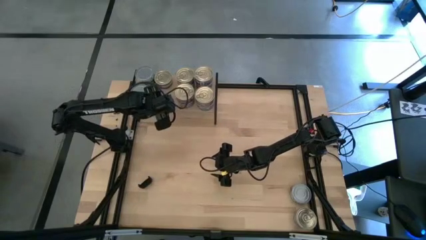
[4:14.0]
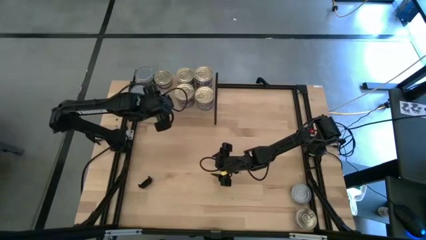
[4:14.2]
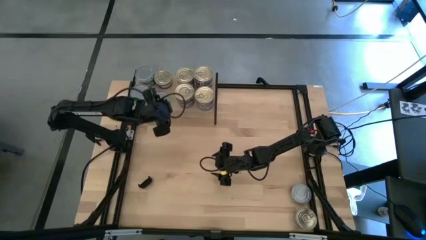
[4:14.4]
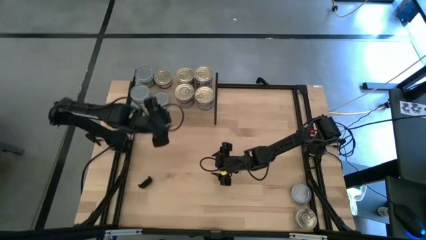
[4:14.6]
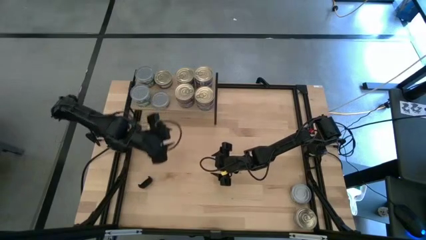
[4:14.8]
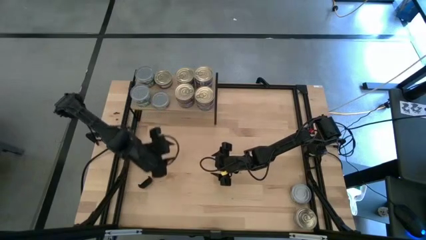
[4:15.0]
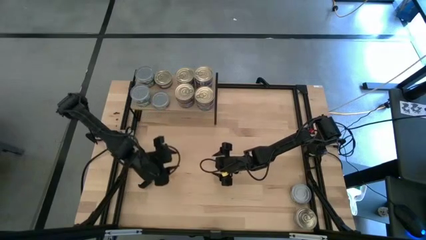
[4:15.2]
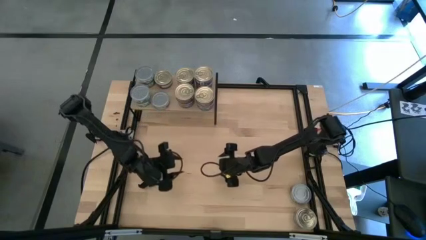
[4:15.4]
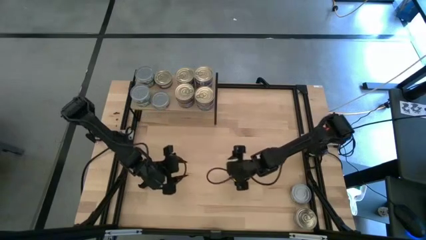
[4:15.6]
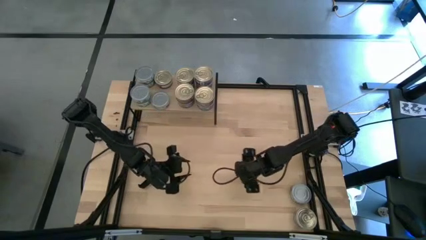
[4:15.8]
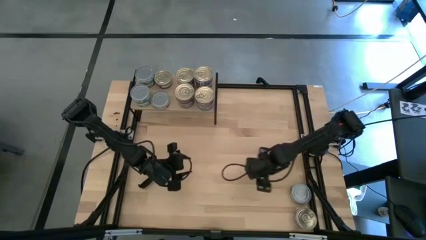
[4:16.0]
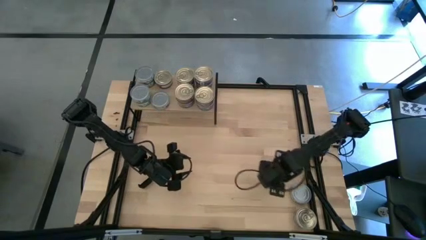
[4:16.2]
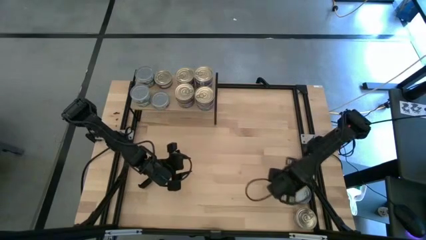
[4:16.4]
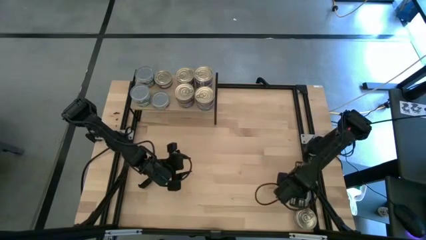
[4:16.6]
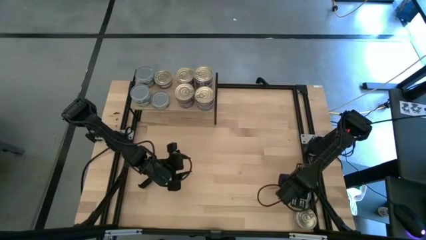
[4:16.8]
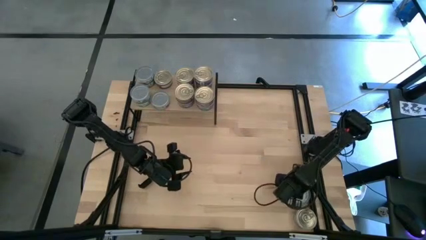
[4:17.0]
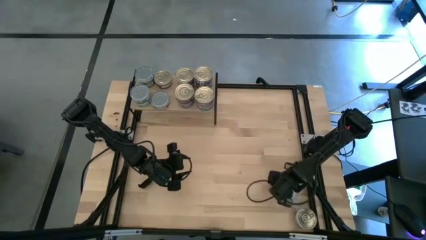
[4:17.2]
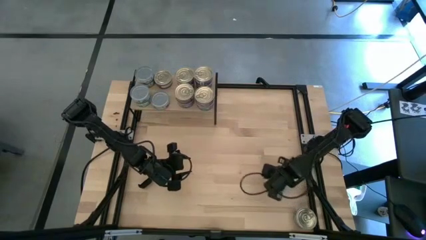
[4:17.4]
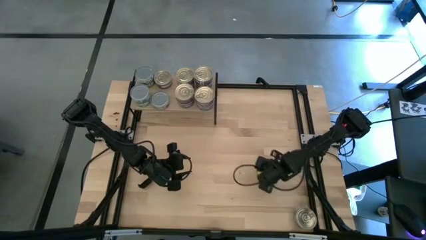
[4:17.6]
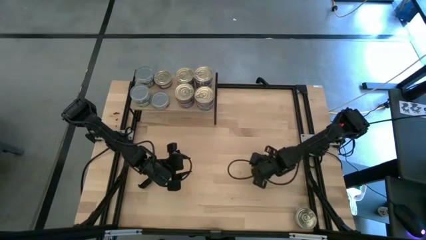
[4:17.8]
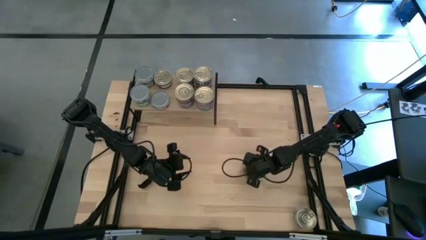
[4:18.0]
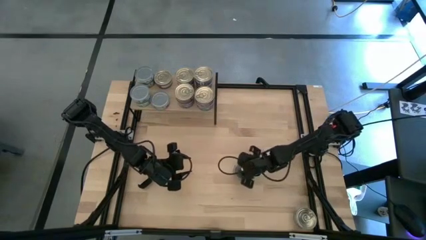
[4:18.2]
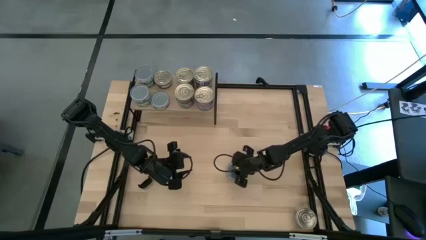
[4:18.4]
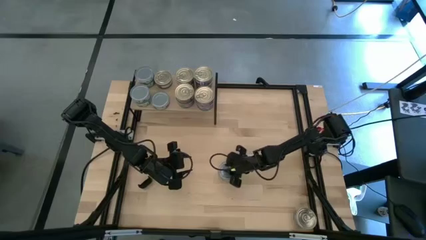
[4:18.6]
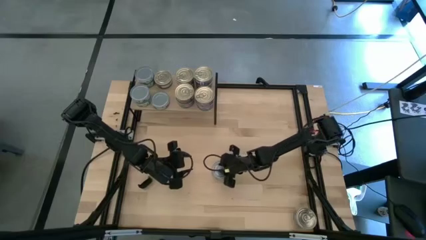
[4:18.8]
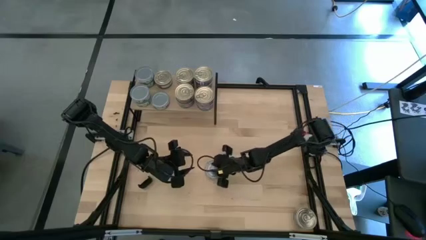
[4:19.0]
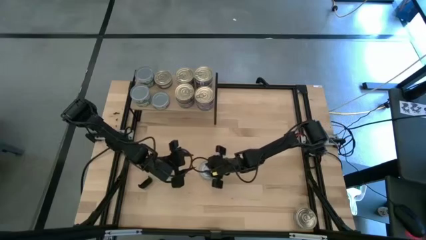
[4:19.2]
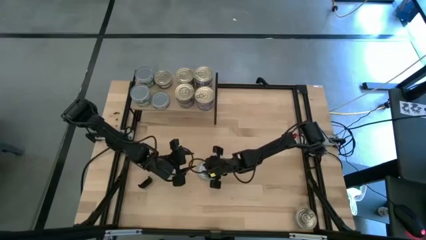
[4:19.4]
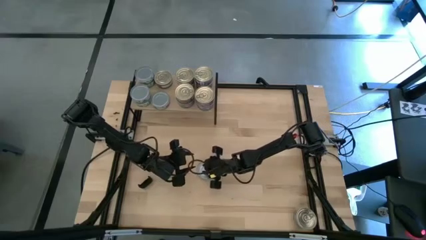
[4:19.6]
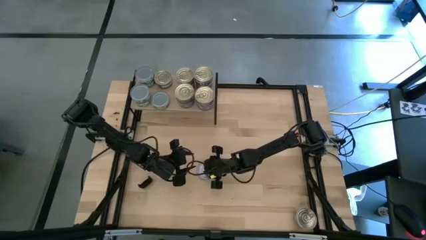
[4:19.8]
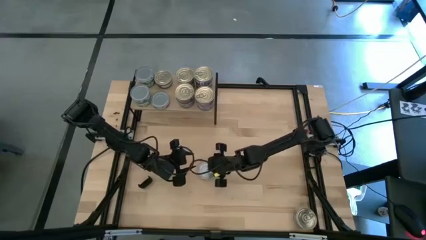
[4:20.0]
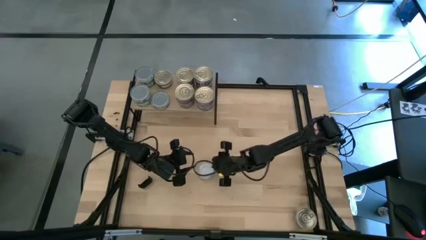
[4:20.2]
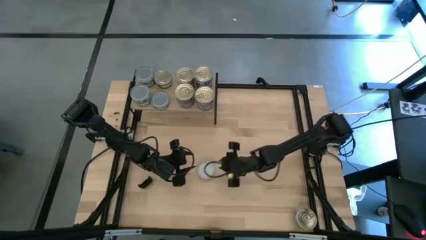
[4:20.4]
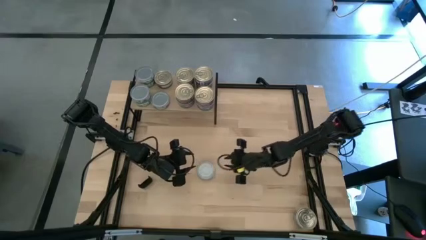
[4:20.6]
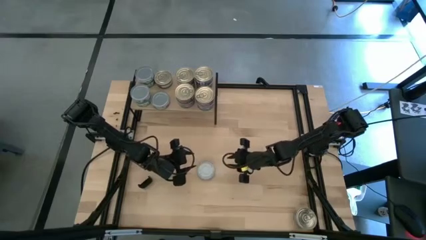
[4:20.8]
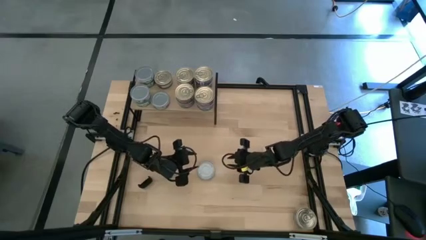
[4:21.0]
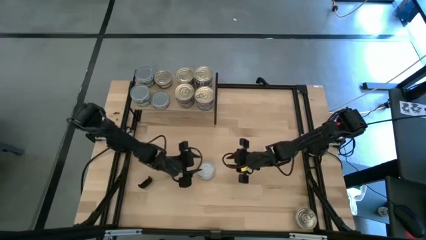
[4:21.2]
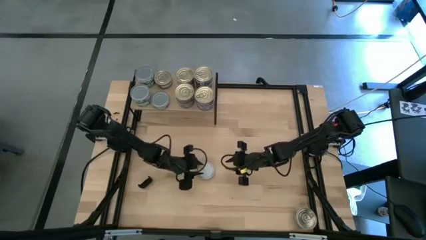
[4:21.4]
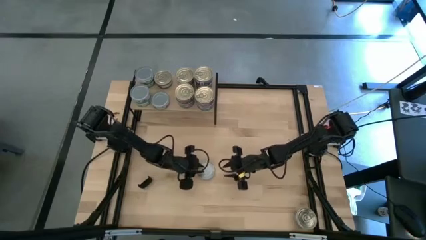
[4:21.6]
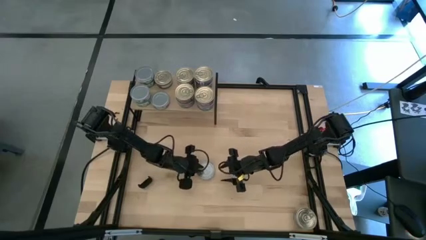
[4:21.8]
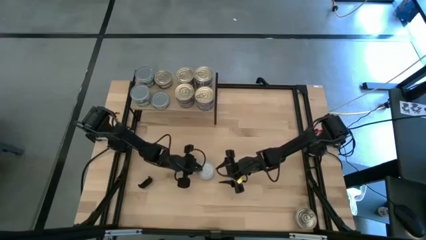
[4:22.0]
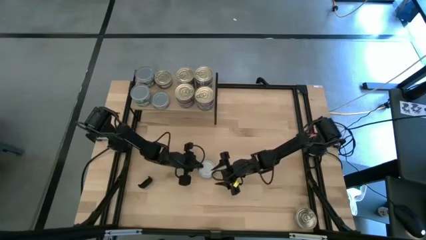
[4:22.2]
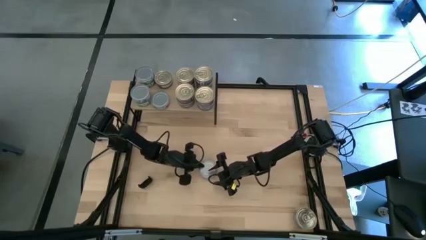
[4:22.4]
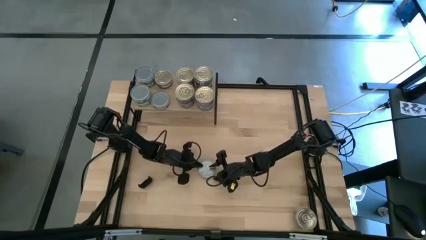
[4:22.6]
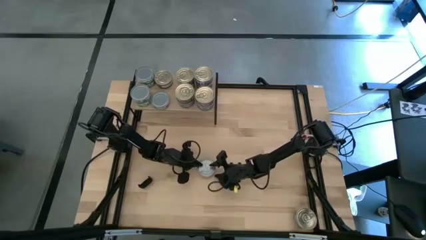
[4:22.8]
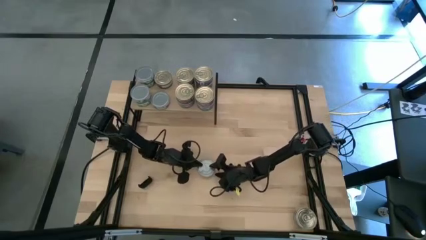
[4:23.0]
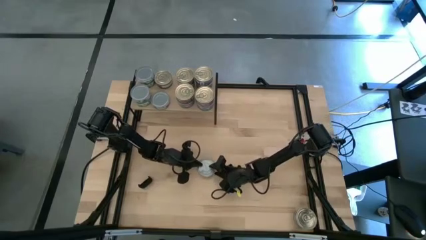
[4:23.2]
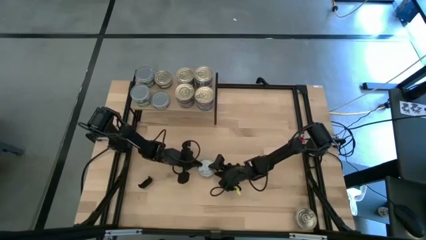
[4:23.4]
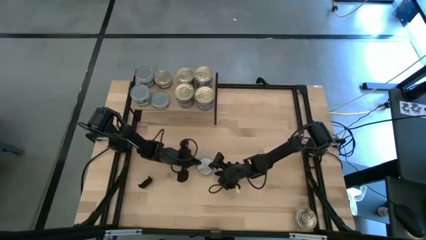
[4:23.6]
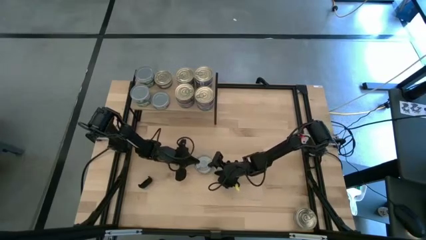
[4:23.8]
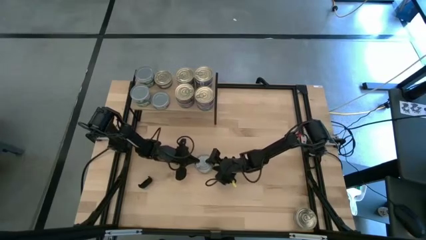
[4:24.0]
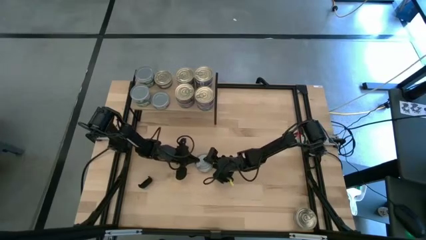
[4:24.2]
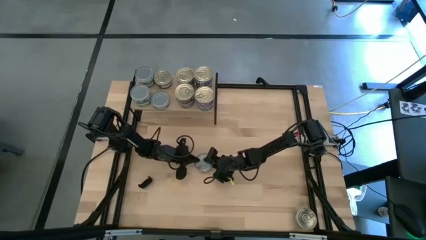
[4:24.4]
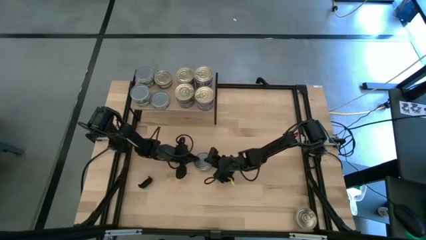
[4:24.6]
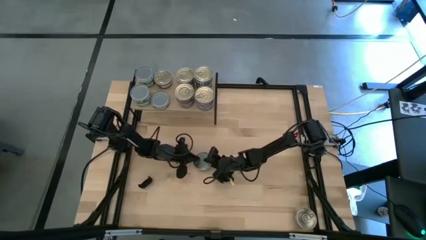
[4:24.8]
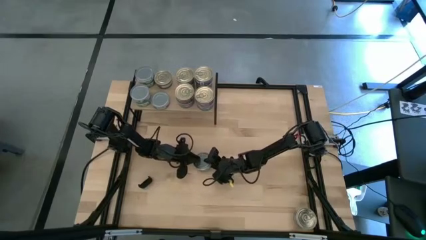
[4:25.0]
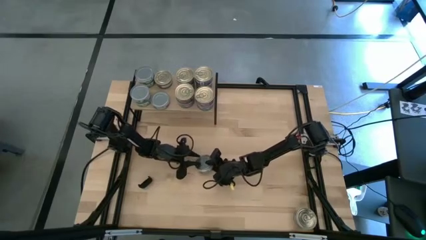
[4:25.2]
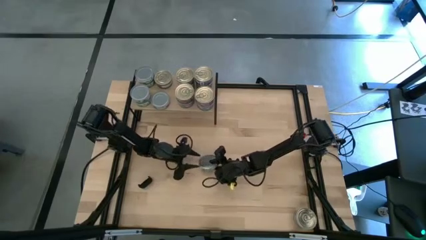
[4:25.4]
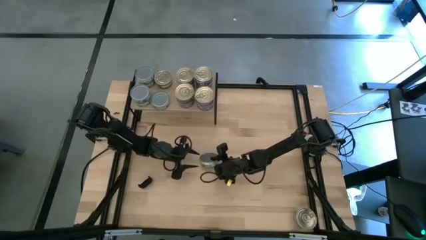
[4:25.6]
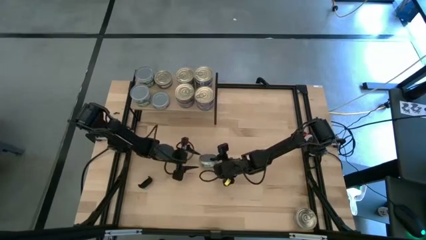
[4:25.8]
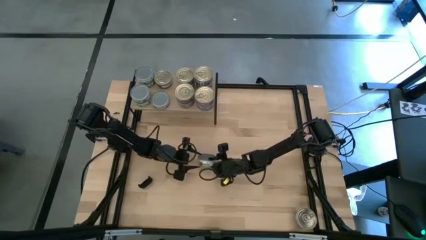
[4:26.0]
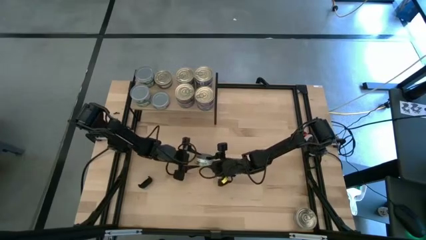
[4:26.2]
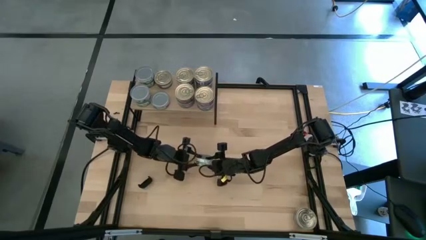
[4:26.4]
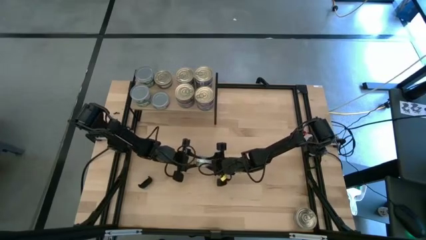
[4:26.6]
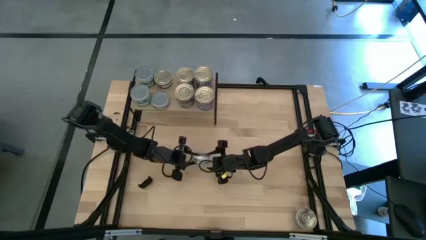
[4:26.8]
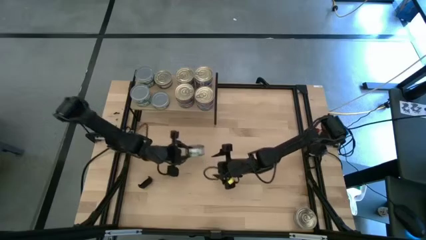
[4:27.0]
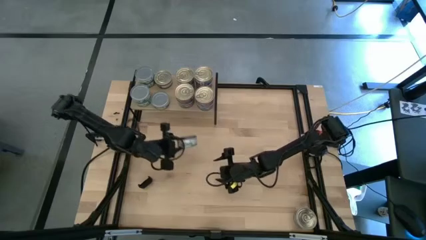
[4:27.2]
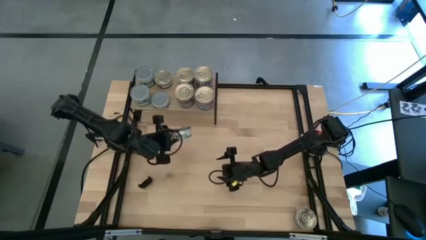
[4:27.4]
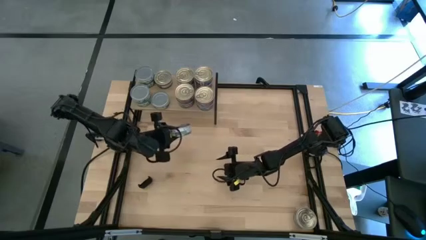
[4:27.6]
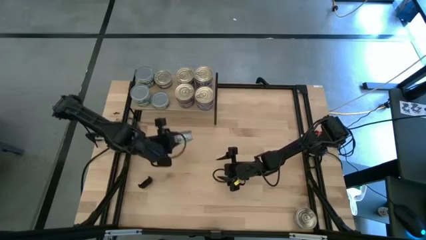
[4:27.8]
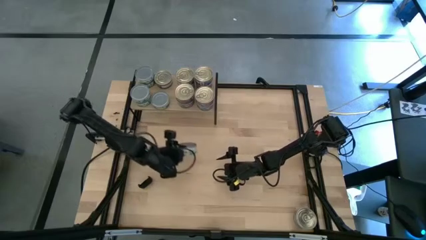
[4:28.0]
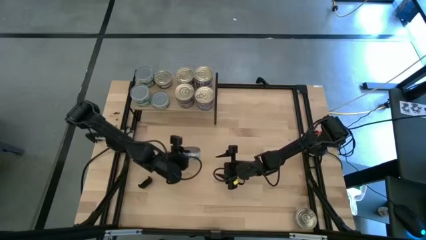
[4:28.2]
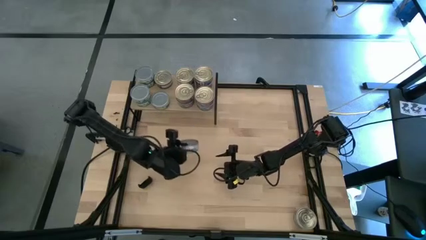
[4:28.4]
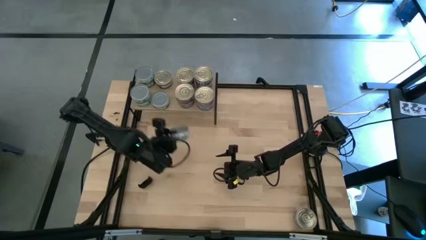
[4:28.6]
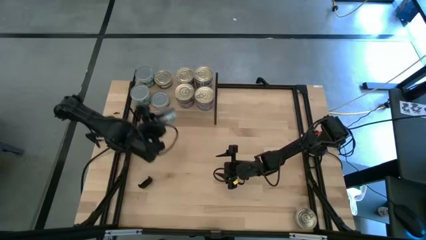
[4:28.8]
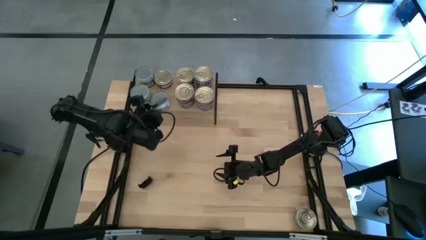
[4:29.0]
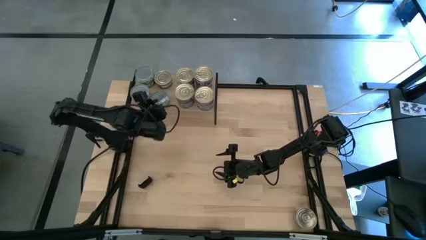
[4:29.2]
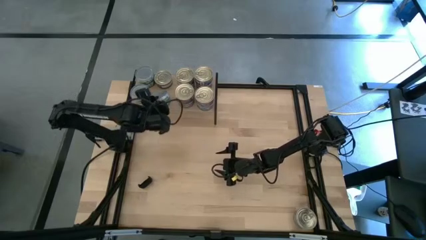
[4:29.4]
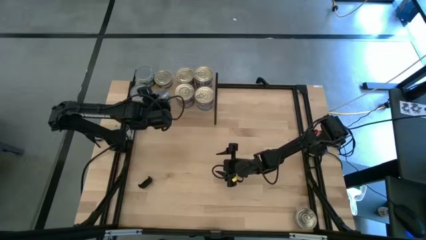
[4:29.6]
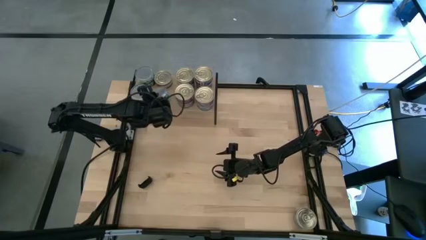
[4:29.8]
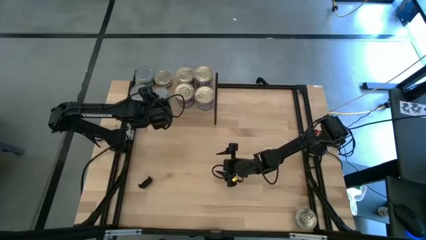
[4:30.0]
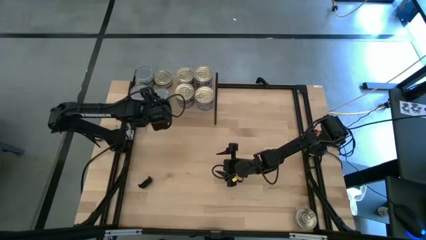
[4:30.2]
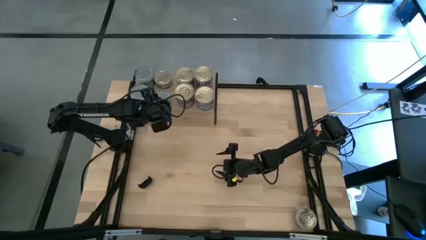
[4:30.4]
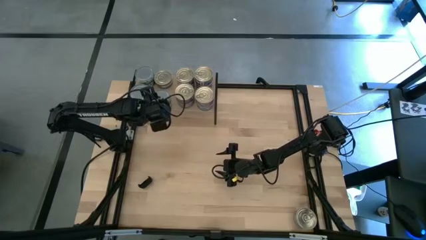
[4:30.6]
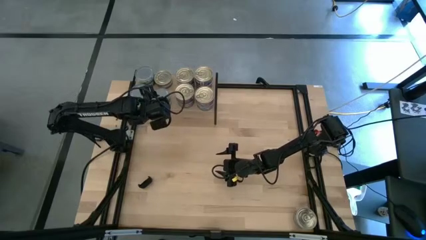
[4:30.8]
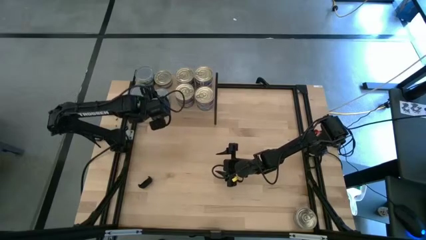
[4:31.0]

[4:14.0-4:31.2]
Task: Stack canned seafood by type on shelf
Stack the green tuna can on top of the green tuna can on the shelf
